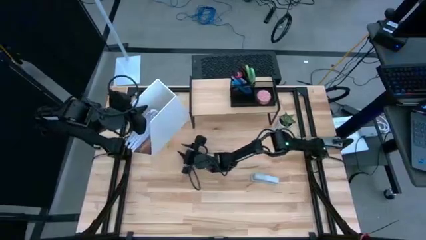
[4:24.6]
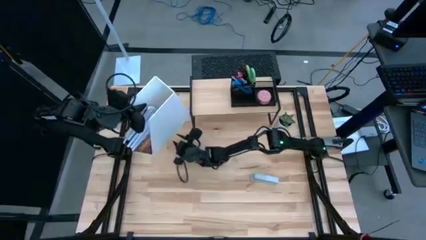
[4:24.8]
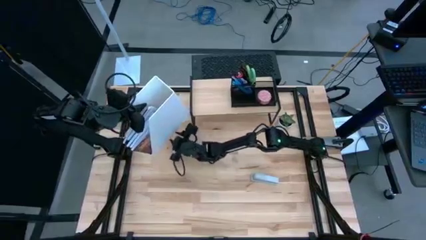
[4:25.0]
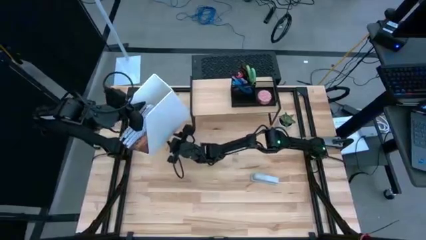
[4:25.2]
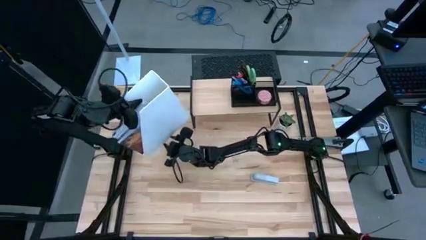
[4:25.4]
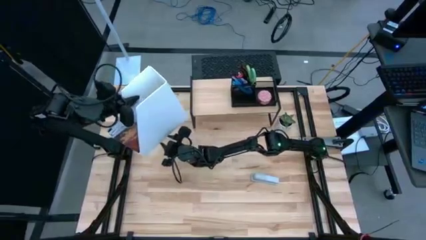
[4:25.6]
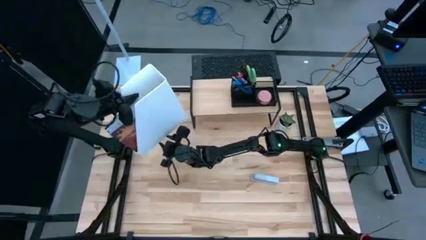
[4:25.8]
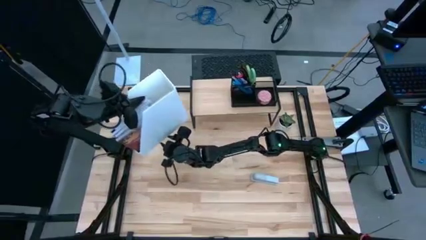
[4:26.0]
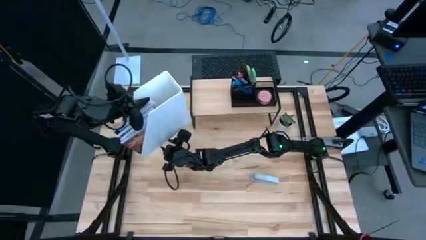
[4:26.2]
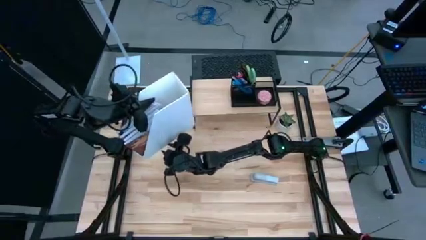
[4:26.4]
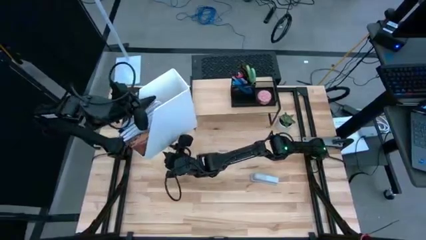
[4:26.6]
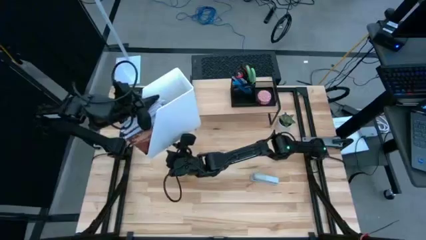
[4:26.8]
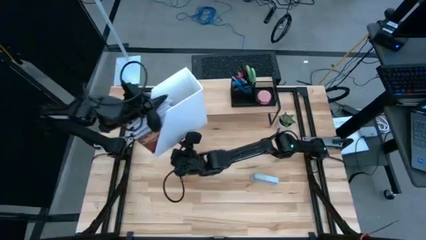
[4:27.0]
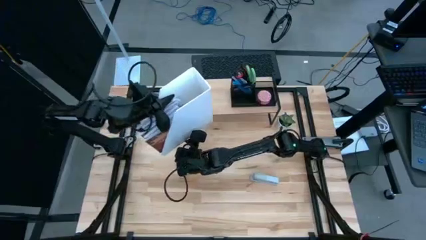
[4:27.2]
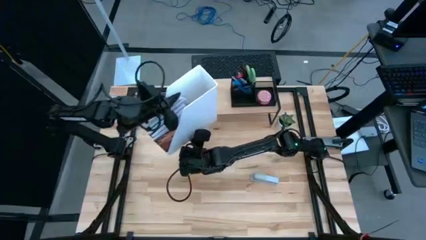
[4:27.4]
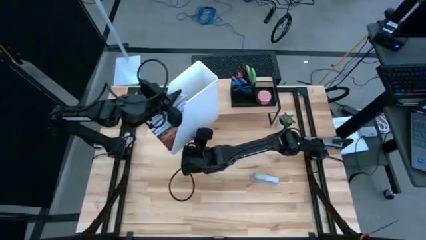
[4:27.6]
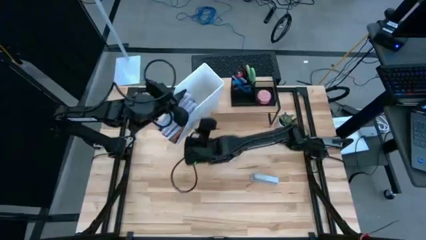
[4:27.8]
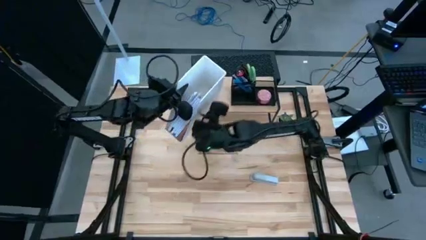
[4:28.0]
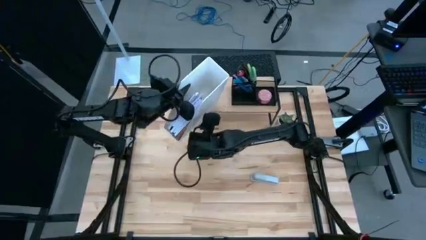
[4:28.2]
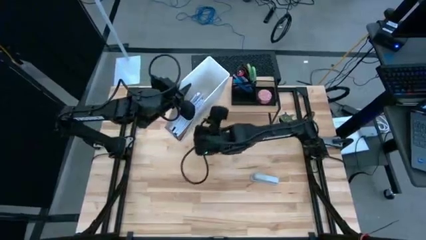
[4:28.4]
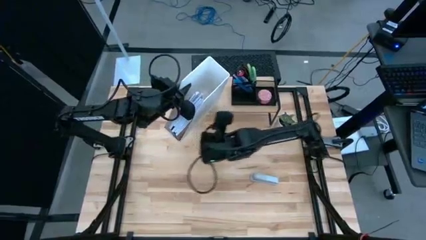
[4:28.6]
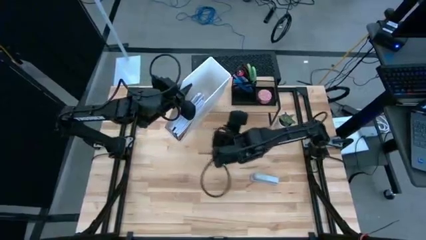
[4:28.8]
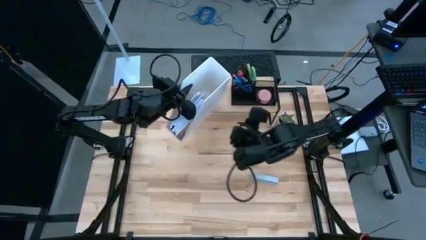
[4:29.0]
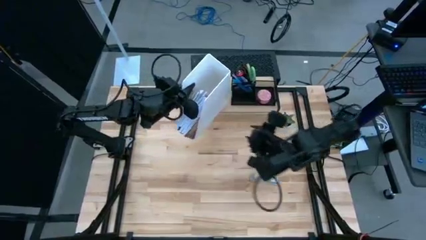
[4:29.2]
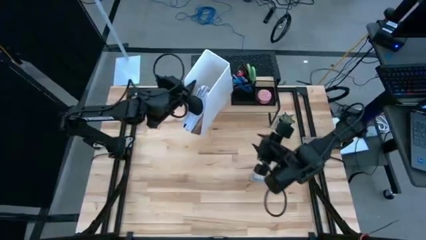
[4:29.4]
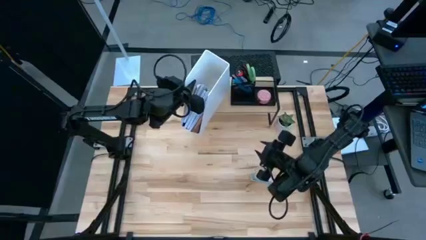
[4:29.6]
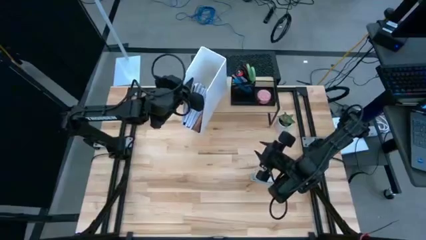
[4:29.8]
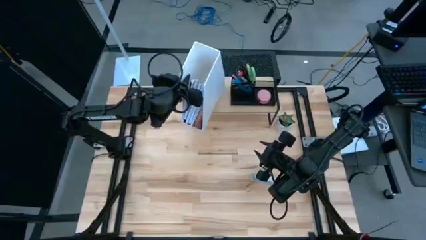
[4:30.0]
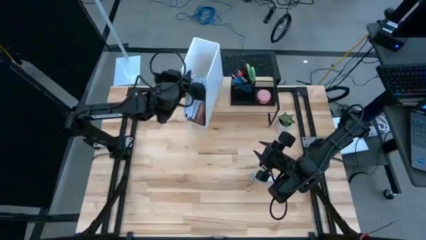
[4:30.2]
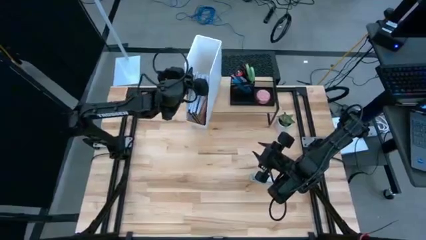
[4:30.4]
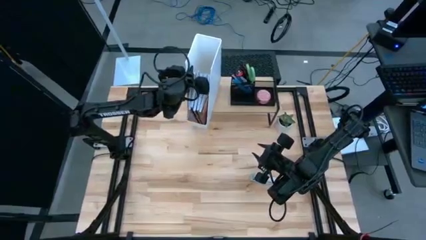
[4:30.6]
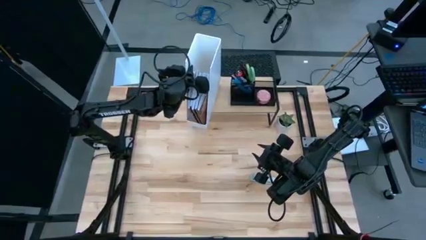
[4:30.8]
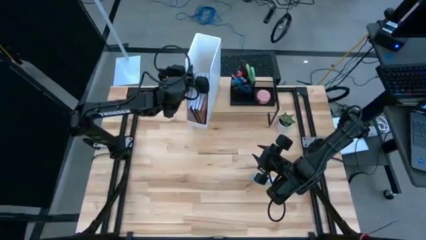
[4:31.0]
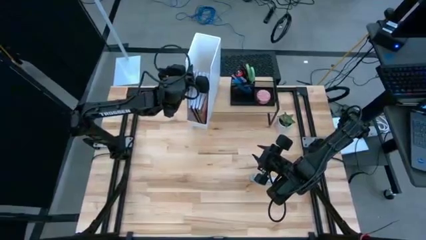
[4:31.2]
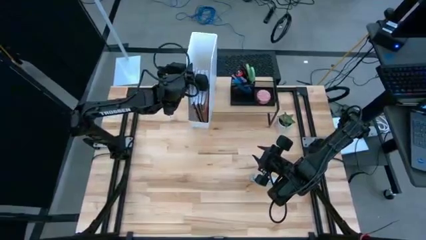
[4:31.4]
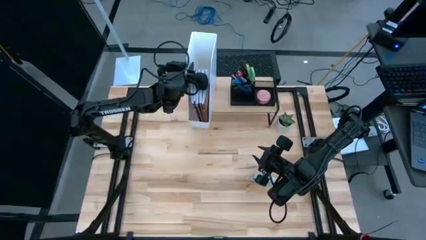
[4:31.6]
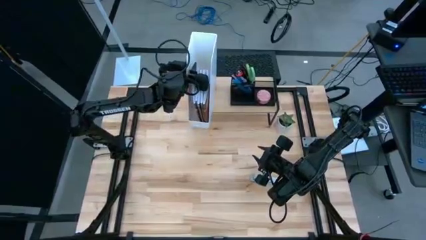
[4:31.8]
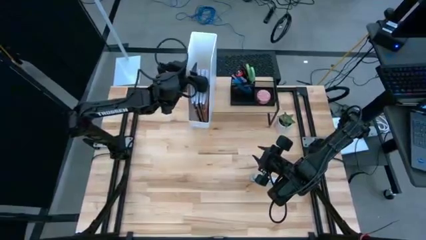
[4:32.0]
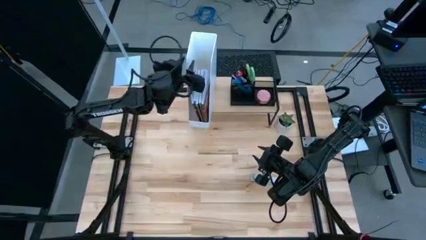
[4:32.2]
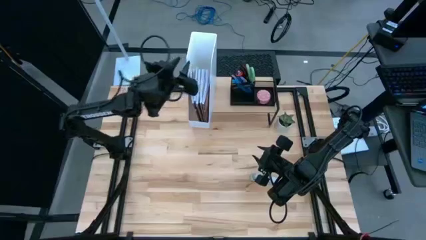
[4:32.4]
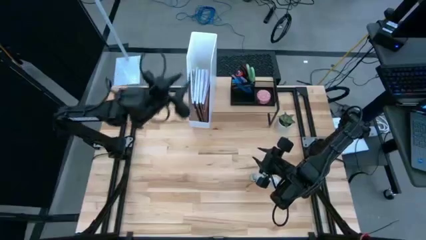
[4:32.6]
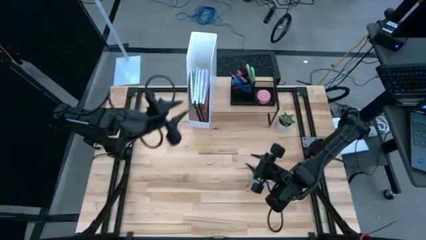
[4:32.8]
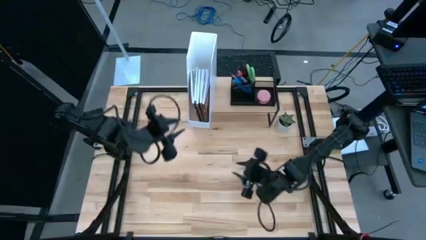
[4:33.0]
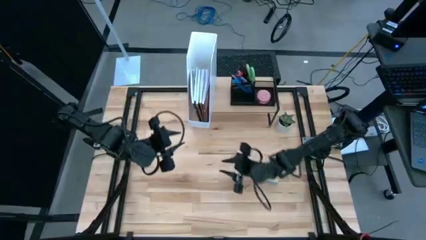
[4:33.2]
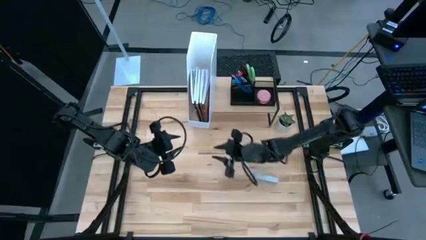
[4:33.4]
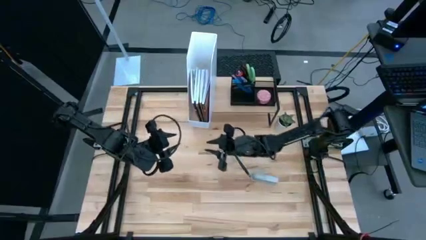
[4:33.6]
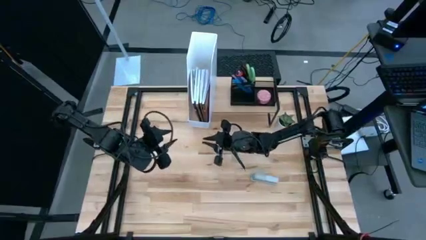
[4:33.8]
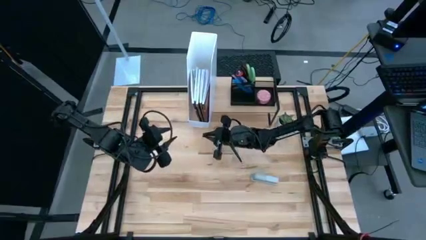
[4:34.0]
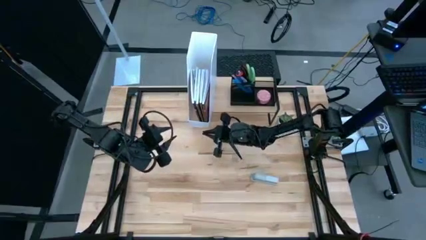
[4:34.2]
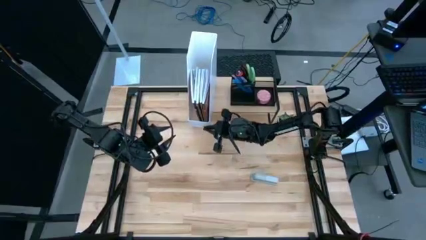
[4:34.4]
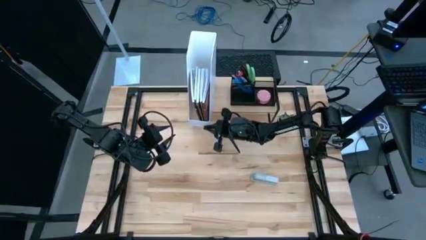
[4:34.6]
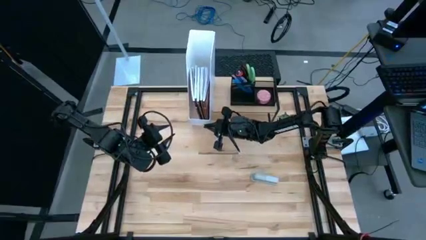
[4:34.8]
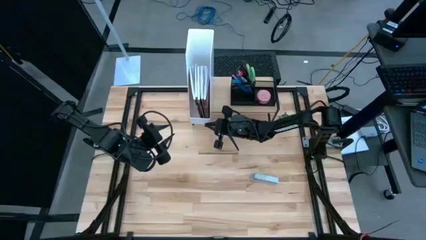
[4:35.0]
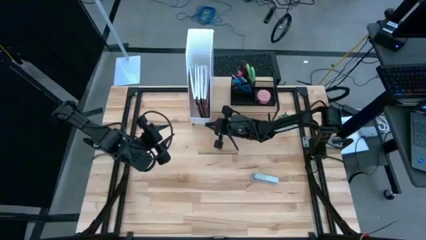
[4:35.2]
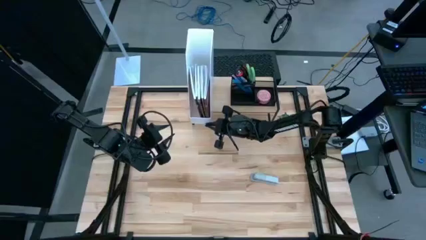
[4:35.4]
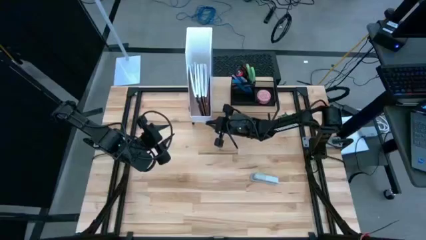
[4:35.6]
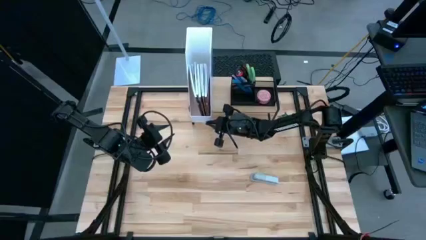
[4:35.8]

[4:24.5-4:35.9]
Task: Stock shelves
Put the white bookshelf on the shelf
